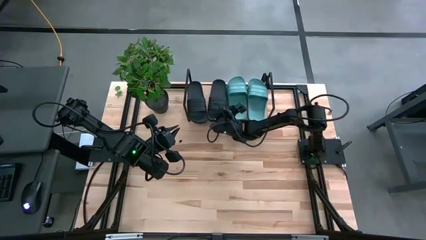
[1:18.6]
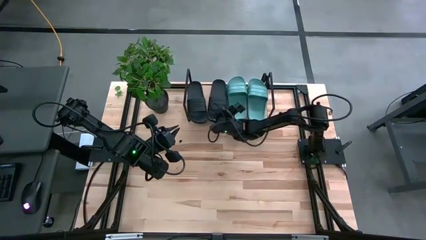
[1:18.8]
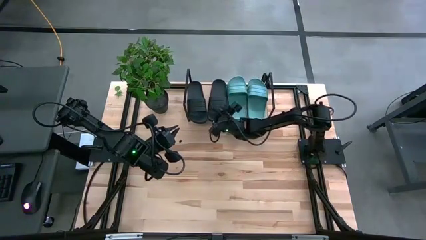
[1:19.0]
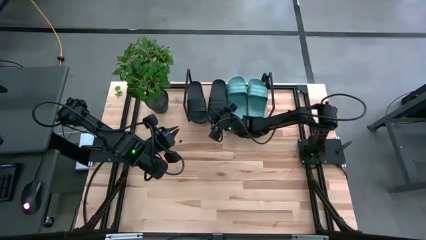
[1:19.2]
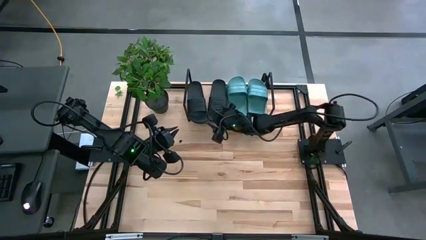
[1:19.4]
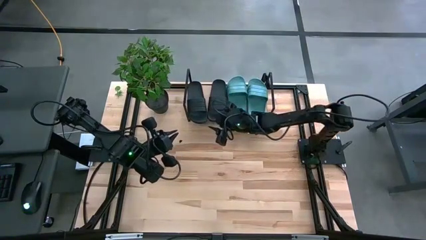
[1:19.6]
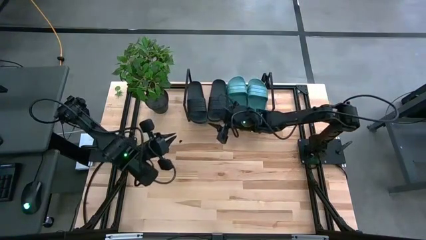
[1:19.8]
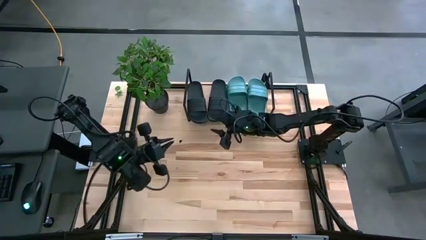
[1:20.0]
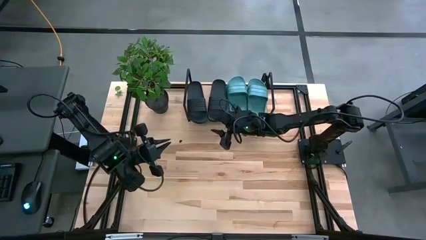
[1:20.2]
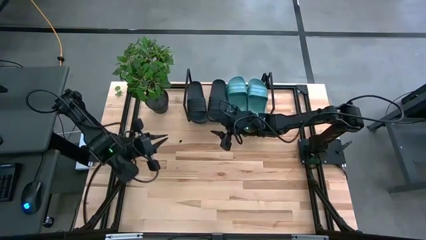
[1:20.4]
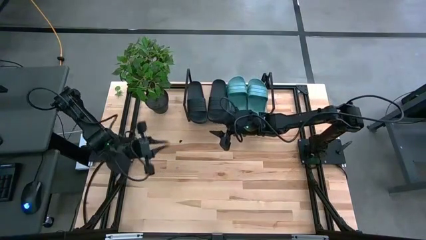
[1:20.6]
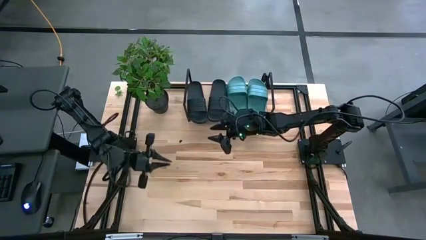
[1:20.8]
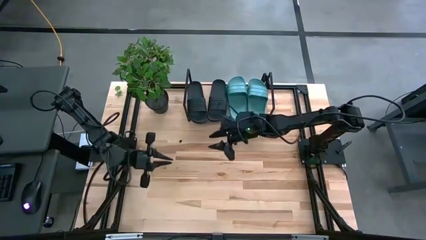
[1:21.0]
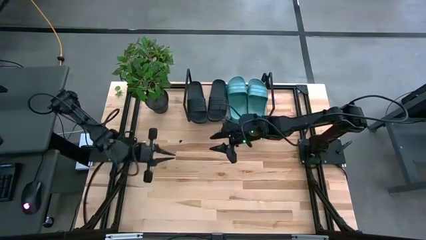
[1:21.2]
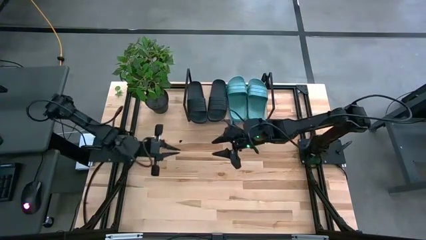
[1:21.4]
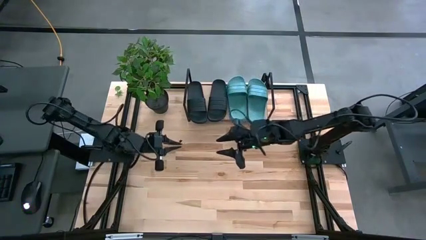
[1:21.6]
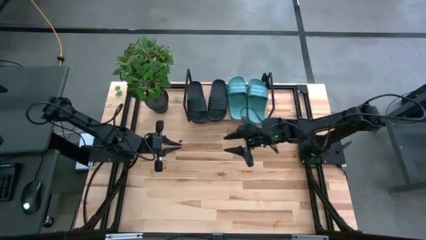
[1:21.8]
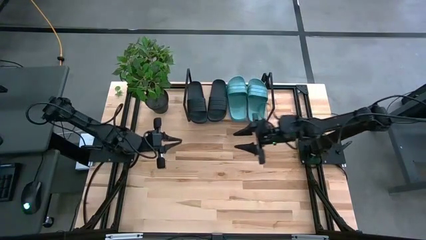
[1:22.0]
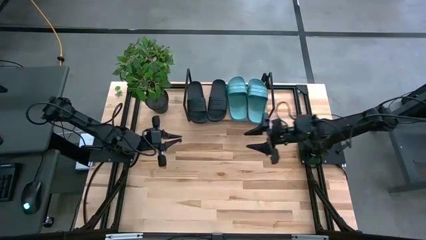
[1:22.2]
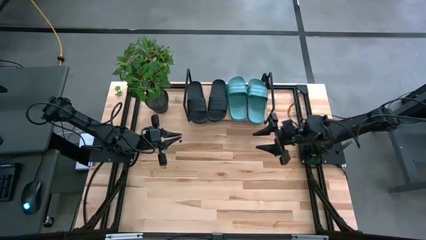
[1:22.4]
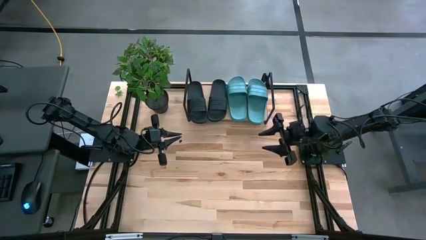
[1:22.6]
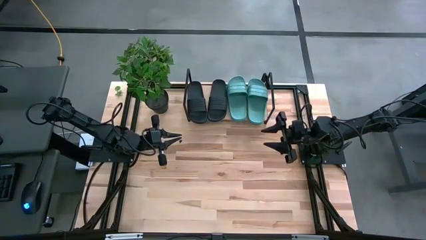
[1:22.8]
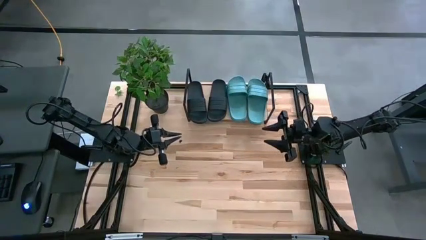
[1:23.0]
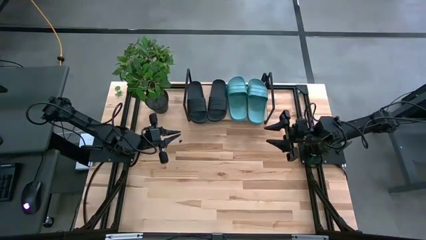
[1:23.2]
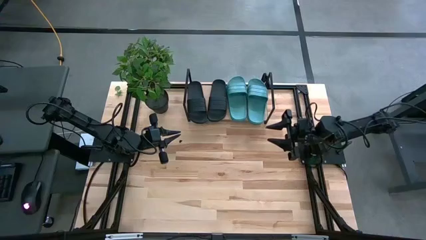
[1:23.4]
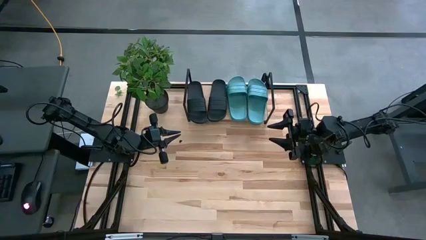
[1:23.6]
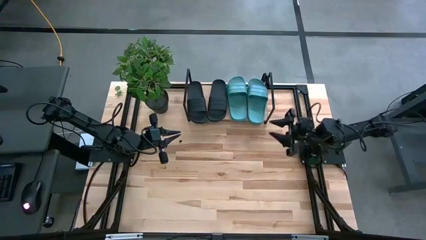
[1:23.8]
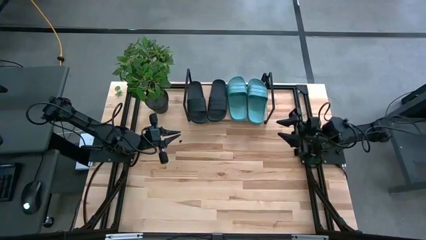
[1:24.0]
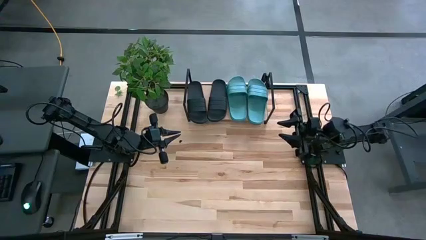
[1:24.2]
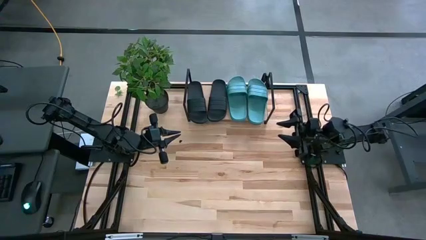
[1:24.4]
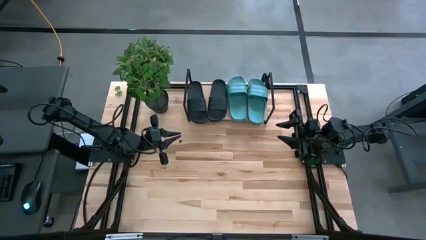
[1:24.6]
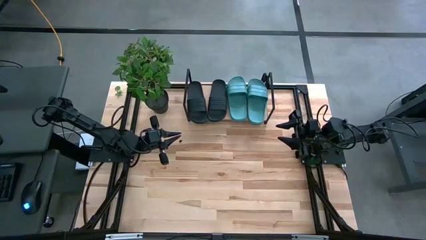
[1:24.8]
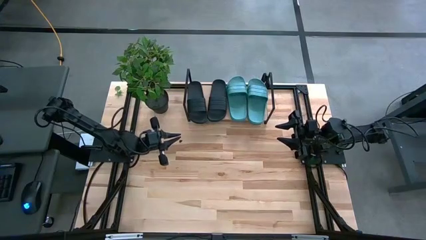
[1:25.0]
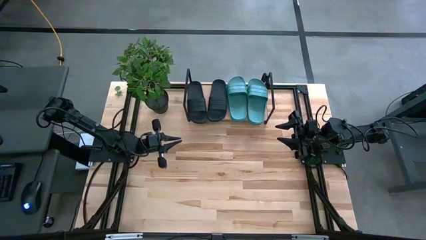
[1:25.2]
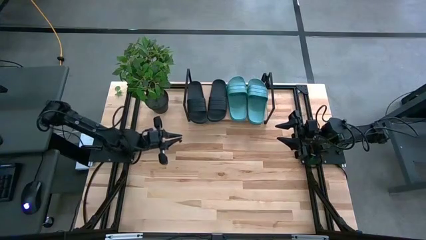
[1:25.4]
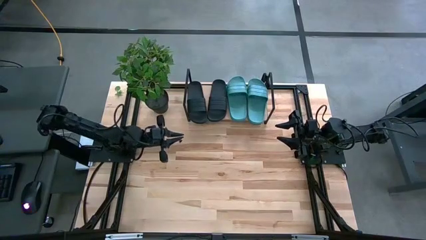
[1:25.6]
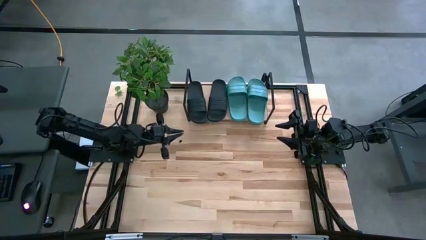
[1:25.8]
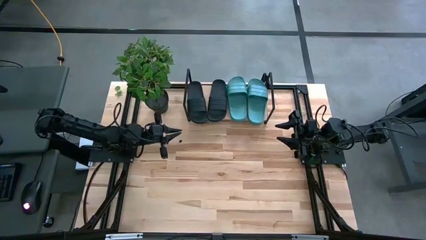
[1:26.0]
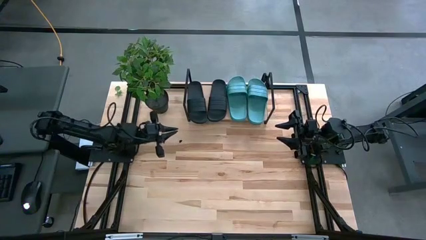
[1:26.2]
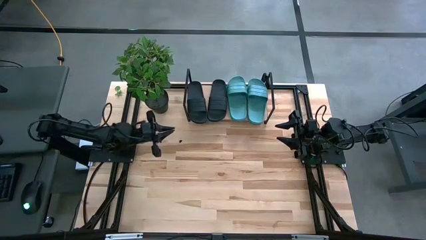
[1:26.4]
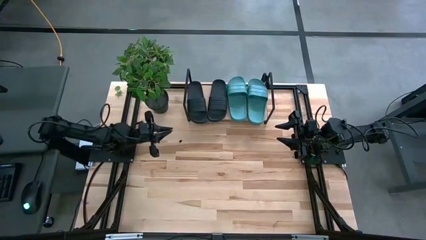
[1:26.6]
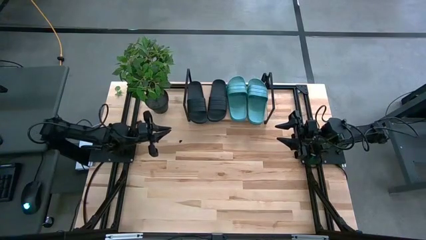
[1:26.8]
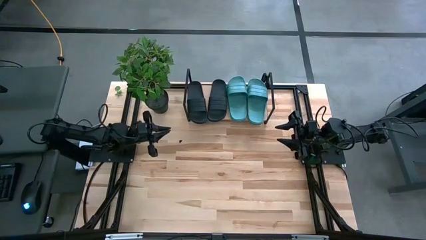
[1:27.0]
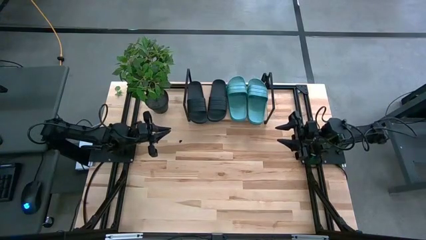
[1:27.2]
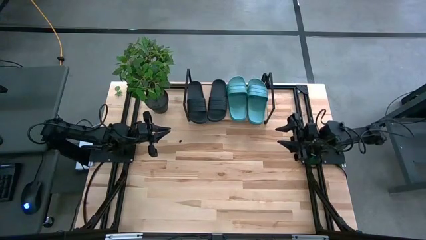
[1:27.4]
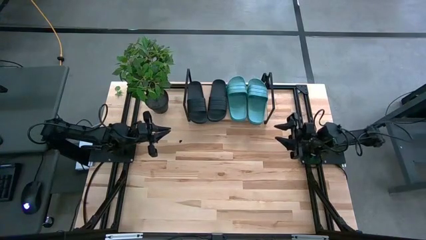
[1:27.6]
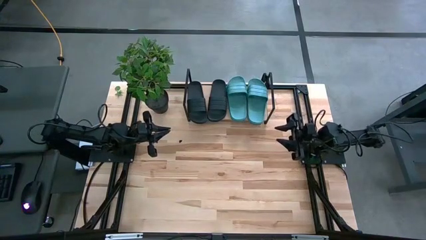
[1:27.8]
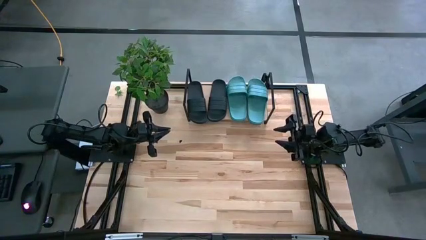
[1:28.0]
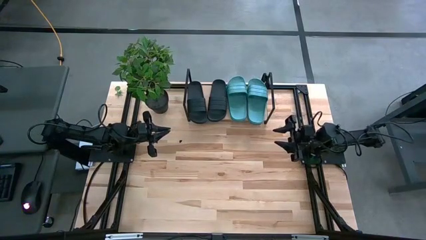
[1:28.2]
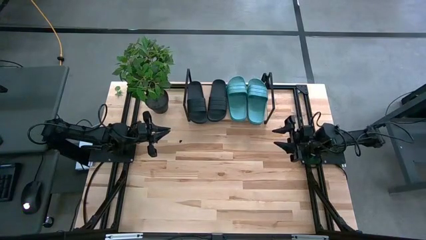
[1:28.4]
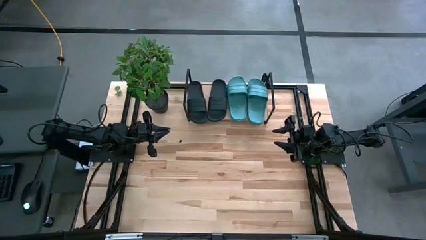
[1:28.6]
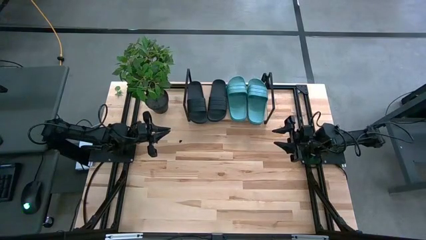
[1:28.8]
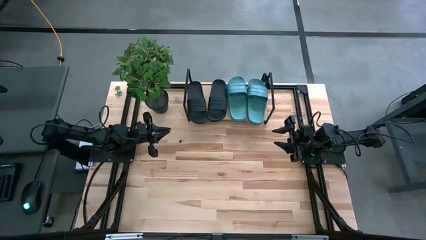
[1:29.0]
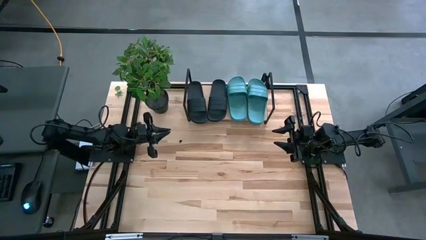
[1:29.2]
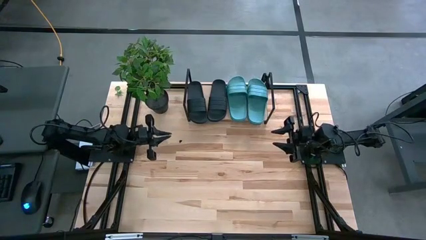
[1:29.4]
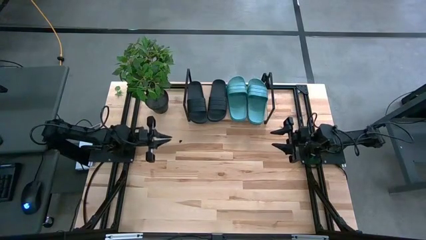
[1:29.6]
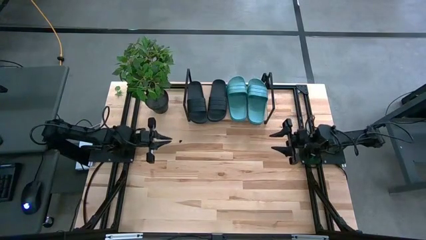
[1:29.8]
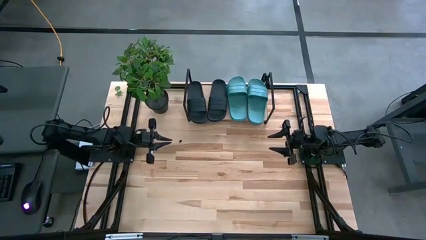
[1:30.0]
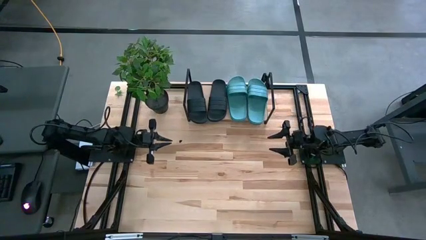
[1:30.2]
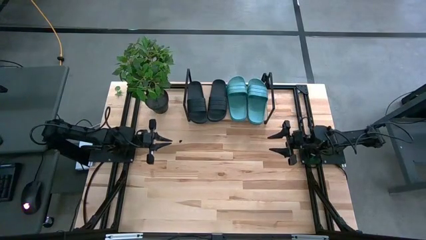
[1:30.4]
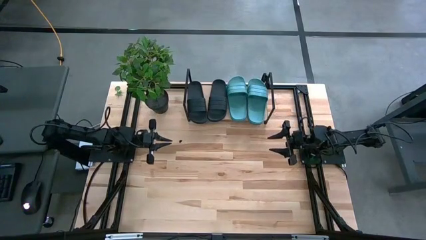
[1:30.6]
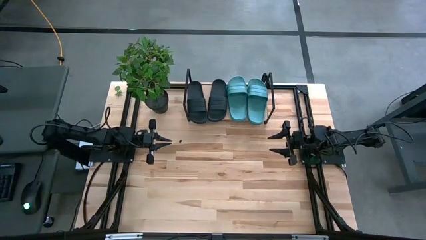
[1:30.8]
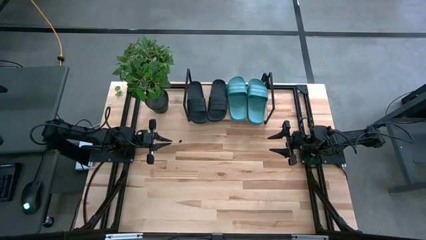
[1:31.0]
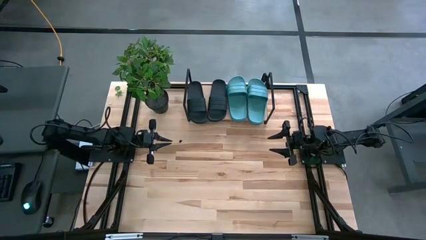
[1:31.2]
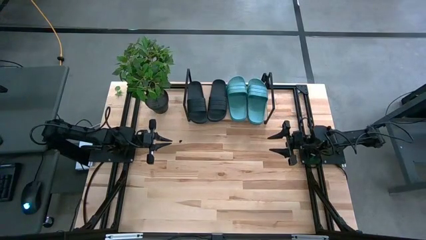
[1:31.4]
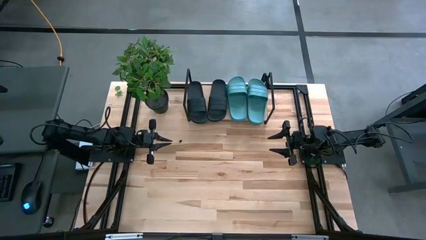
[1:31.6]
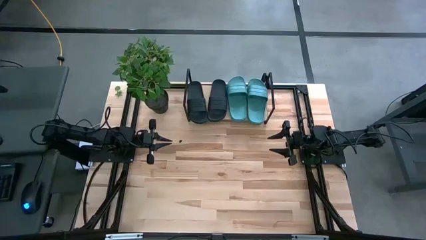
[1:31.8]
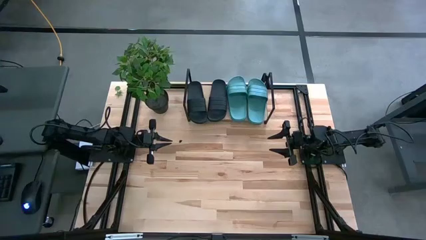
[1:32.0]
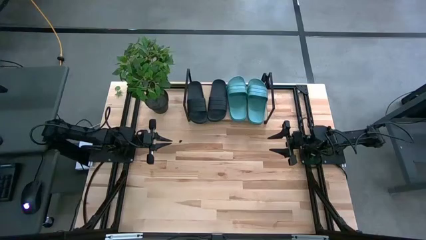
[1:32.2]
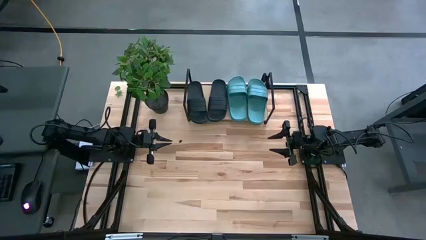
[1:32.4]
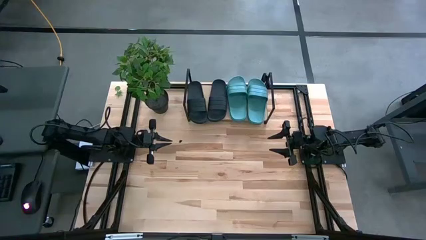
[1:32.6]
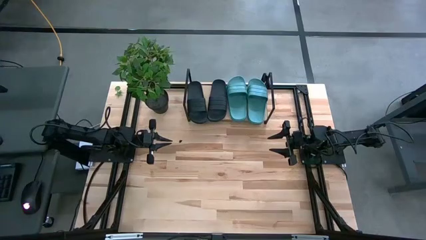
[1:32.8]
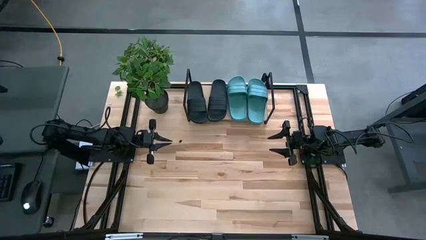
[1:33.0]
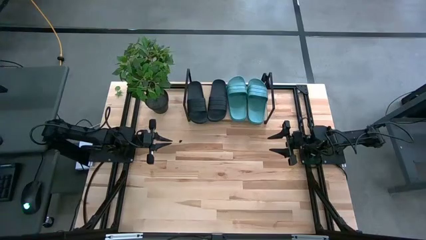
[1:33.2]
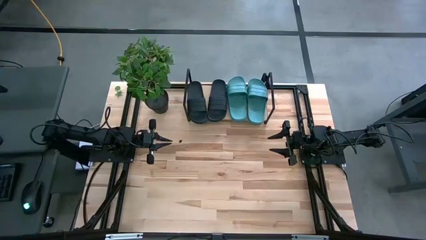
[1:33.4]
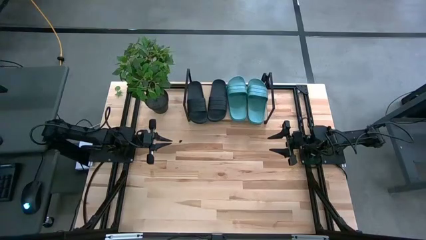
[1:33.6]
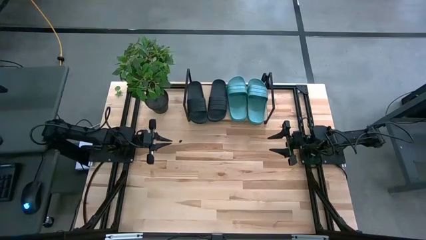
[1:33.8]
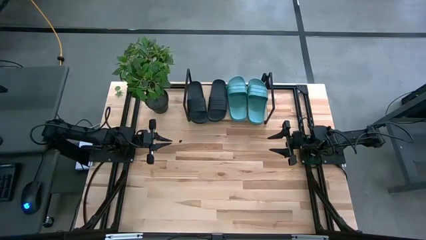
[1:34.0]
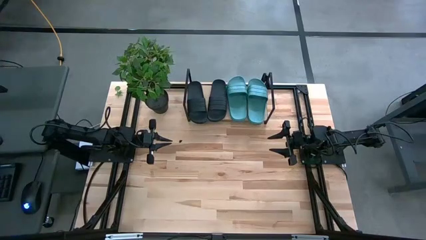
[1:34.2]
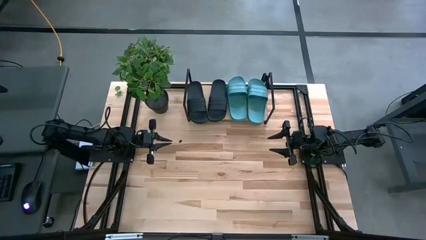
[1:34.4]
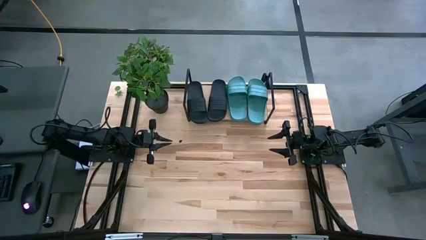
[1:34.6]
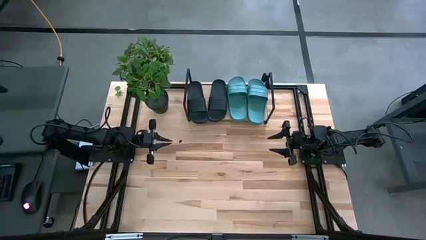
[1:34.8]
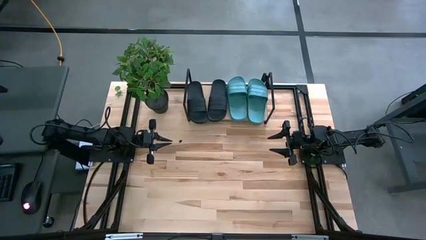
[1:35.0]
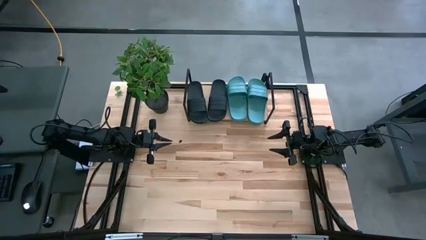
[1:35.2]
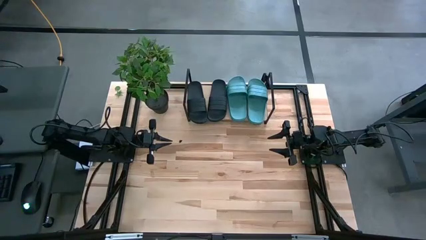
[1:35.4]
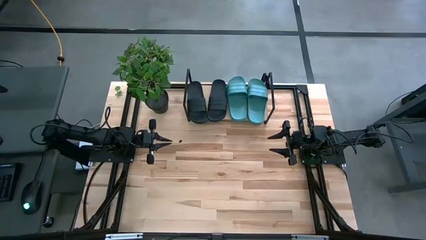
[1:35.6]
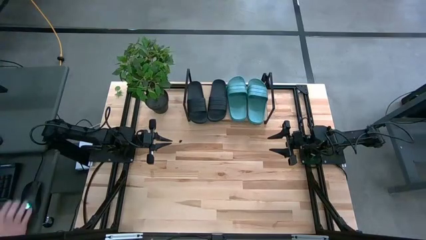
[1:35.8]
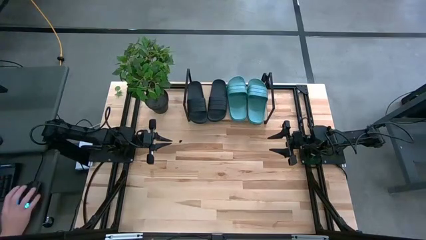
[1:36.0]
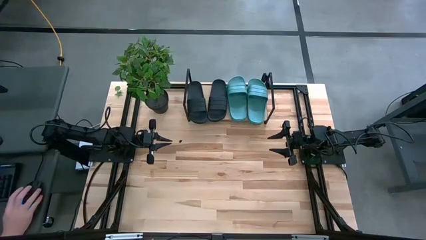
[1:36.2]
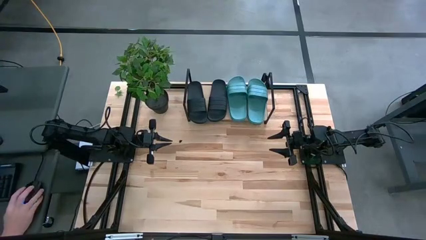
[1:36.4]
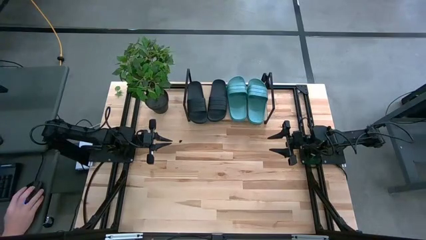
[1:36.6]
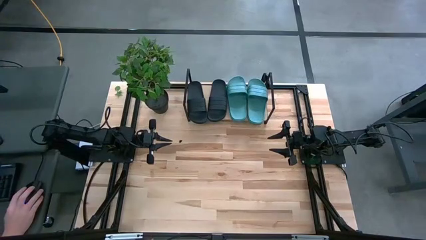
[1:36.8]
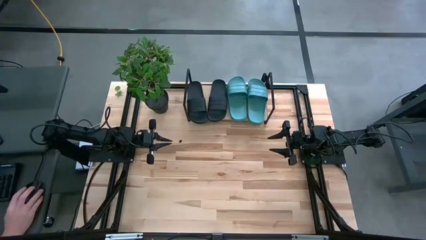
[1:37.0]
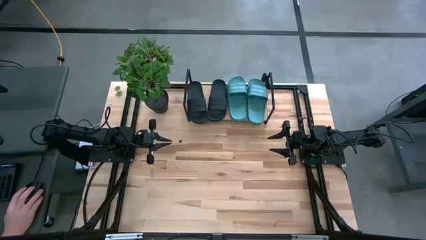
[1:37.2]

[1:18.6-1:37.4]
Task: Pick and place slides into the shelf
Return to Home Position
